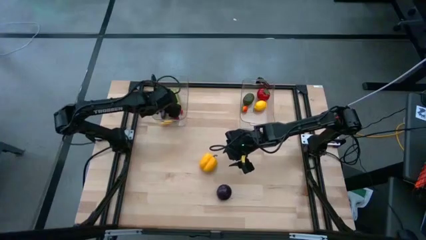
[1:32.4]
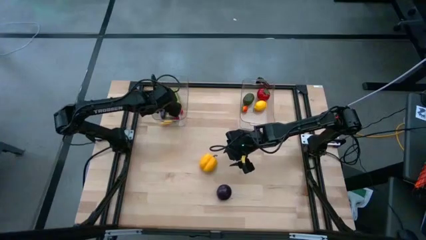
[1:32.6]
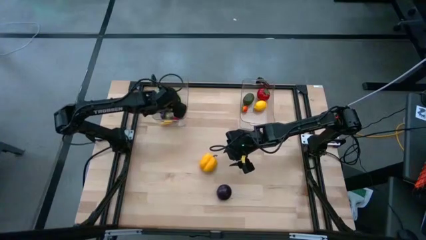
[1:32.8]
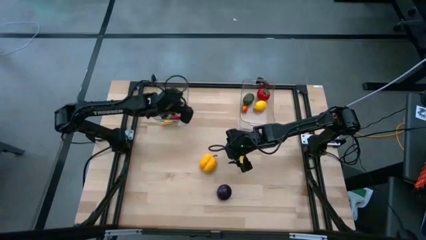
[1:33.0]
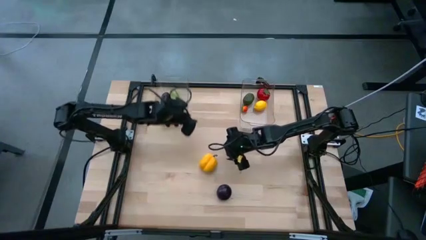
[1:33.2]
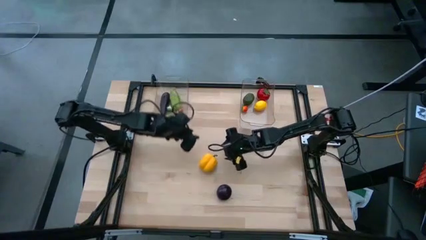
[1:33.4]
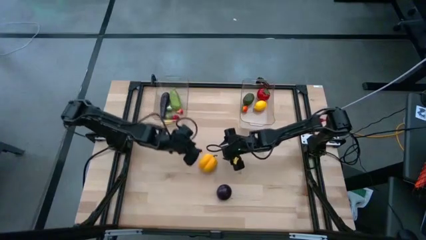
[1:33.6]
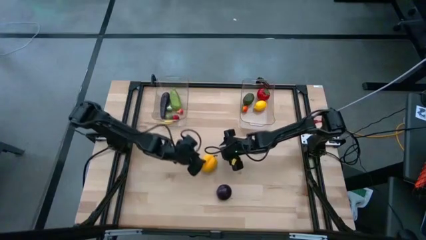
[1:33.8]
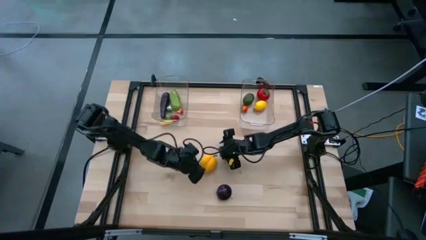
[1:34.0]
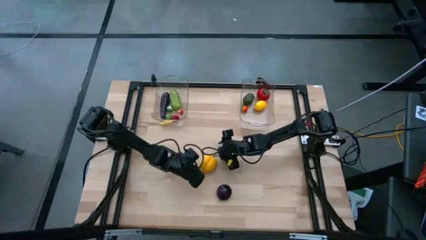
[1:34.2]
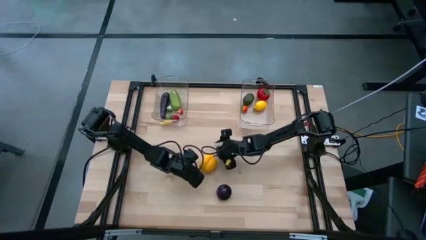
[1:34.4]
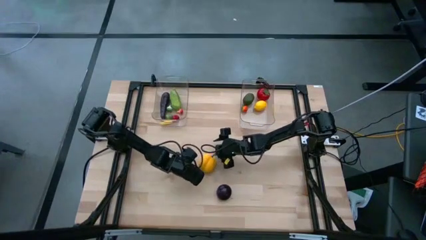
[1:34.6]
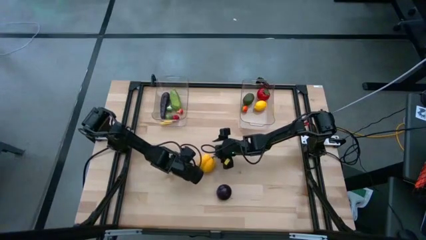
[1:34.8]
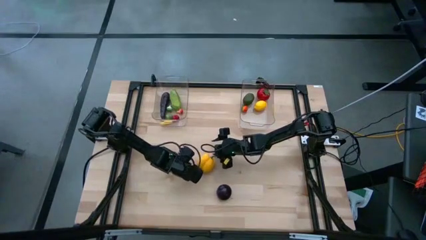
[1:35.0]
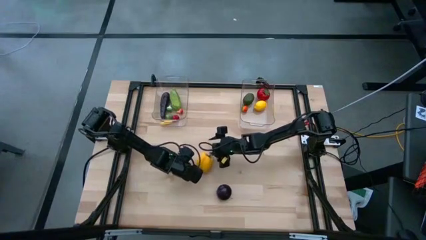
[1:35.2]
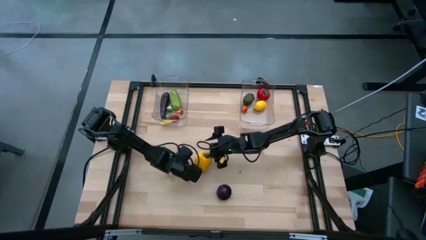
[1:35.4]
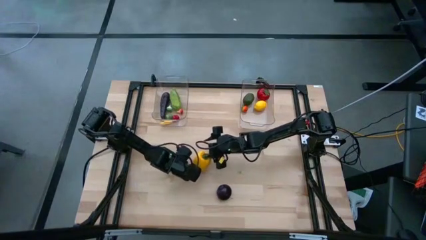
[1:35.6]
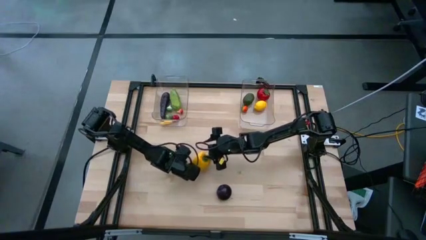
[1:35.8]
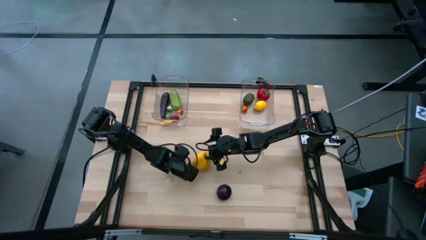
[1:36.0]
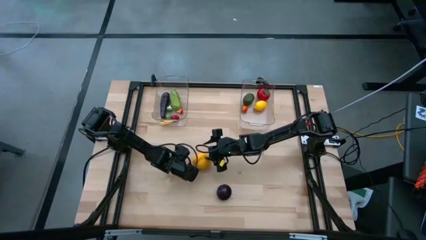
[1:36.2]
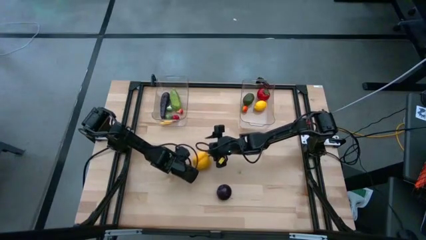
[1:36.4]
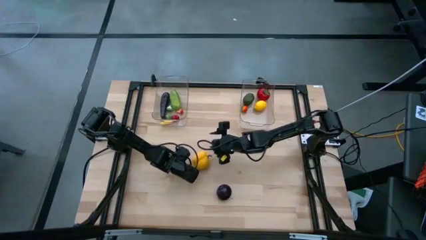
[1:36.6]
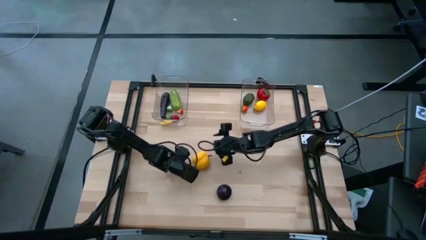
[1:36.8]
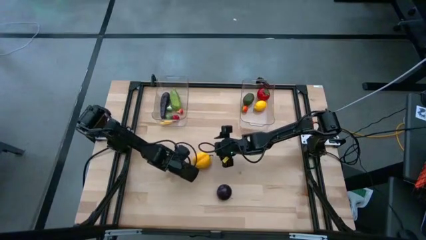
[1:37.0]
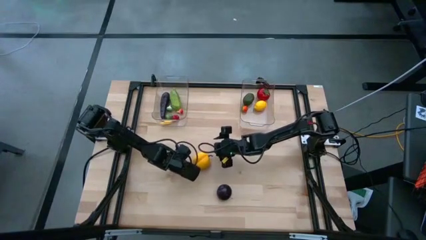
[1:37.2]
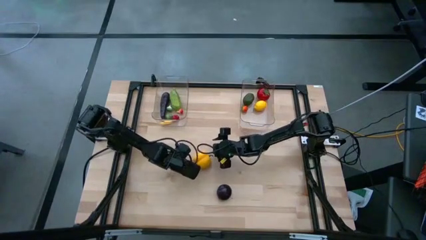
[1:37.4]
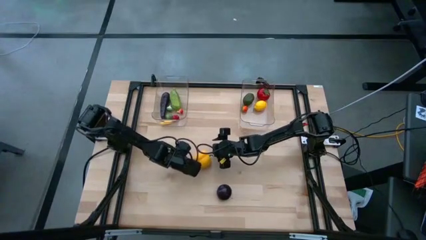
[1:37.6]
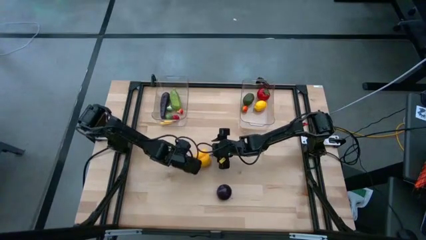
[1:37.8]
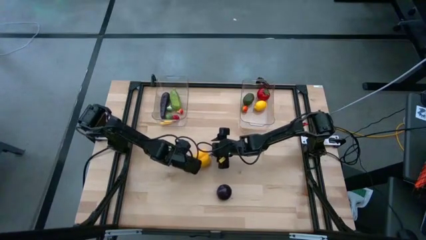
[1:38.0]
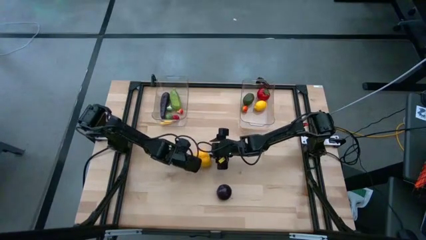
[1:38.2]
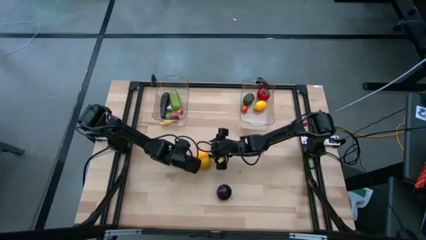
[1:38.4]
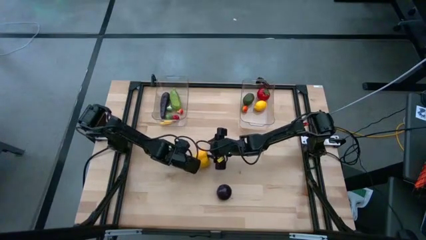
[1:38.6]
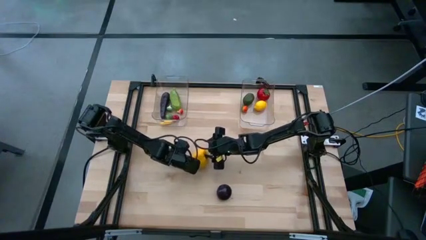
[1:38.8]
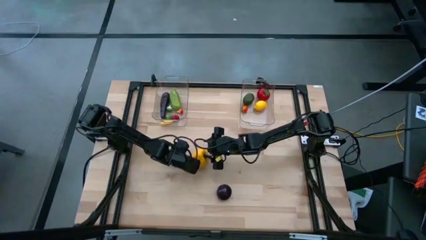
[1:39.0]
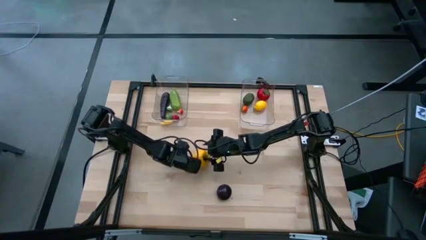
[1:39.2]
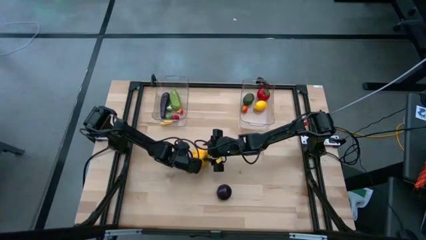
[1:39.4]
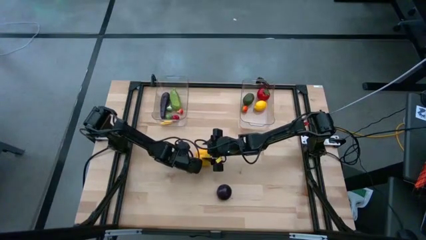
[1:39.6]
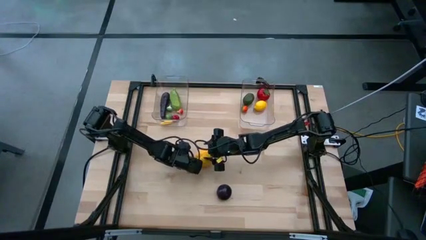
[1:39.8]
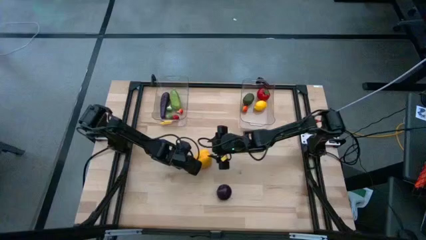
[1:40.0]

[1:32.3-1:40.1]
Task: Sort produce into baskets
Put the yellow bell pepper into the left transparent bin

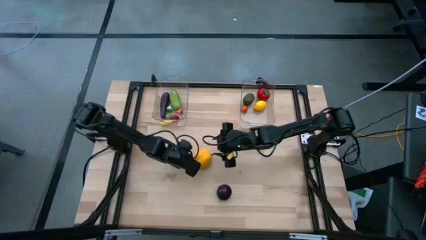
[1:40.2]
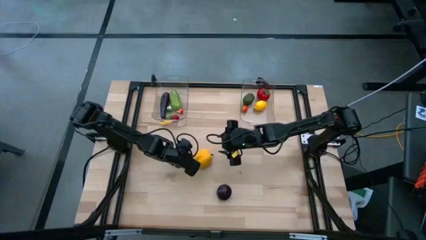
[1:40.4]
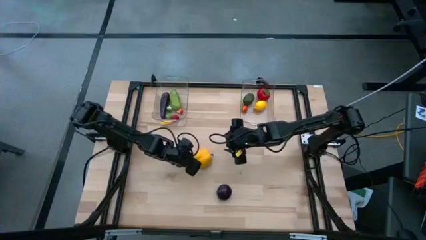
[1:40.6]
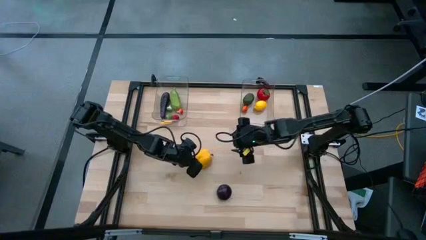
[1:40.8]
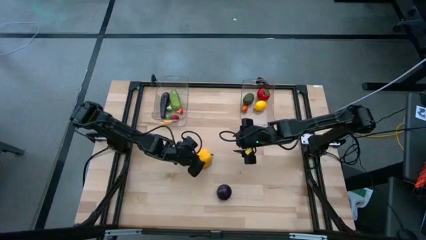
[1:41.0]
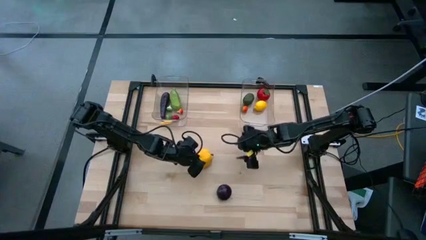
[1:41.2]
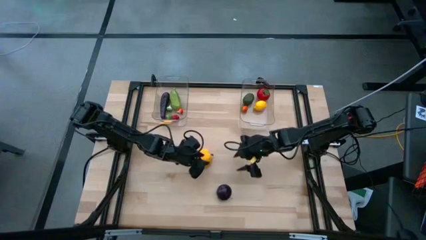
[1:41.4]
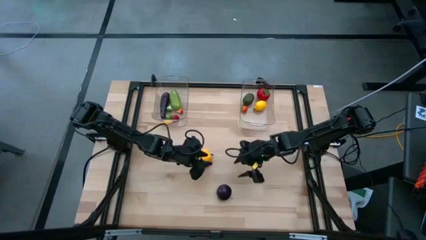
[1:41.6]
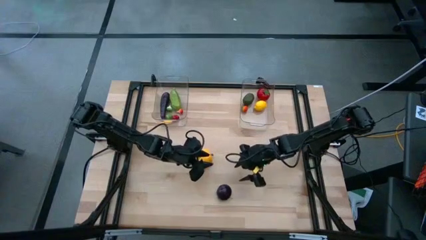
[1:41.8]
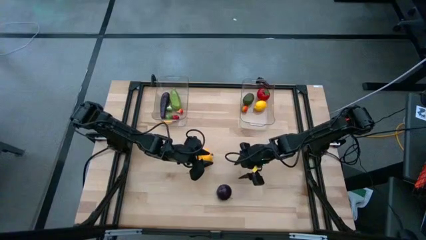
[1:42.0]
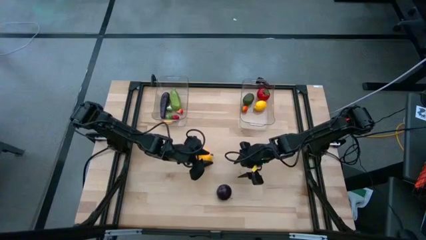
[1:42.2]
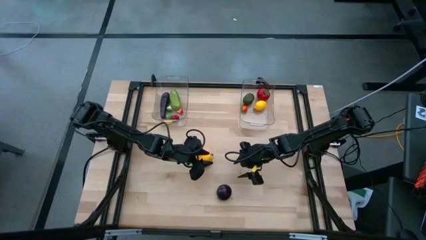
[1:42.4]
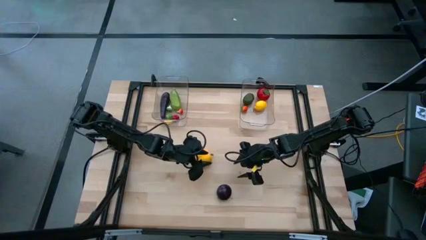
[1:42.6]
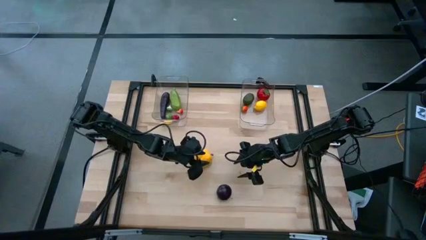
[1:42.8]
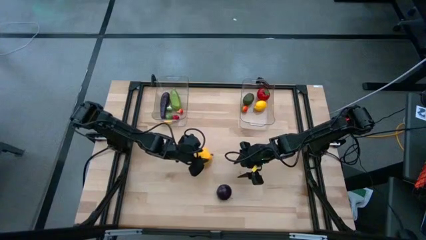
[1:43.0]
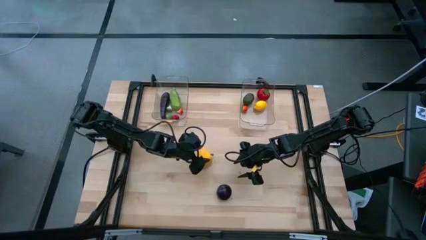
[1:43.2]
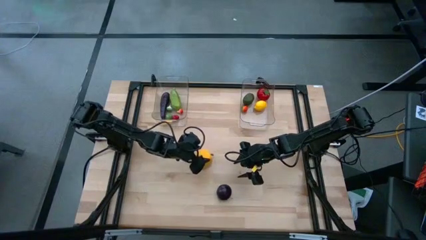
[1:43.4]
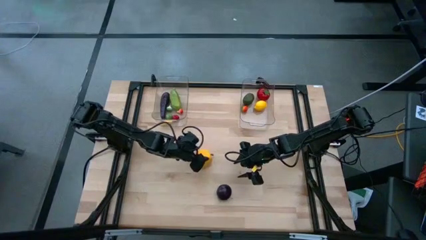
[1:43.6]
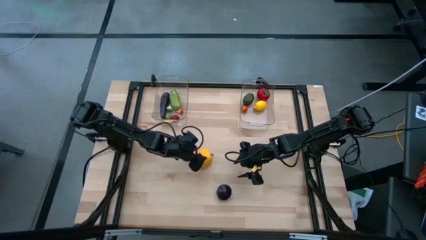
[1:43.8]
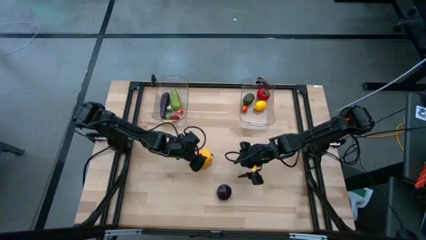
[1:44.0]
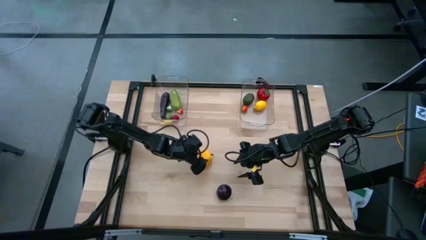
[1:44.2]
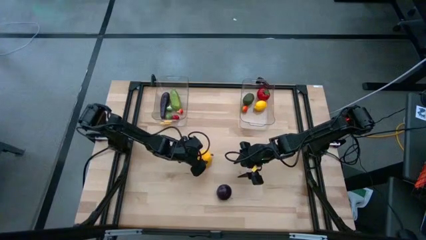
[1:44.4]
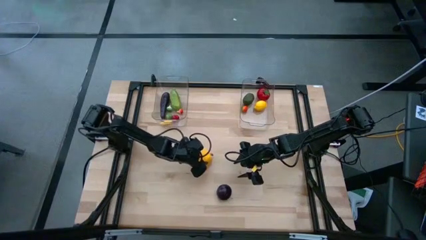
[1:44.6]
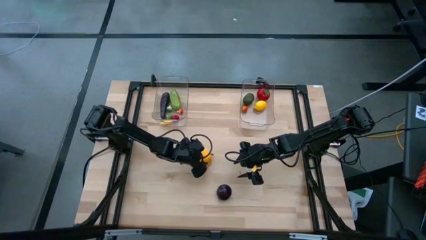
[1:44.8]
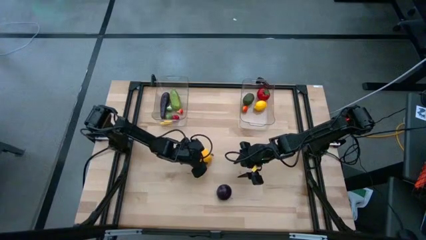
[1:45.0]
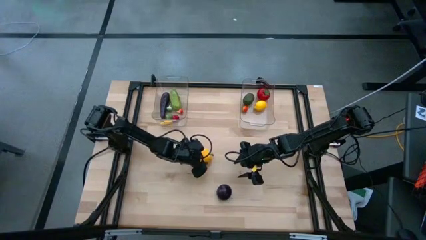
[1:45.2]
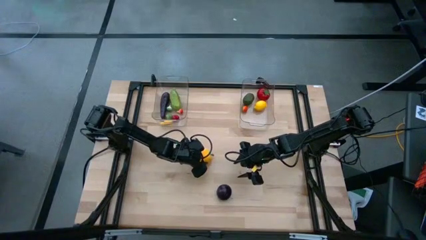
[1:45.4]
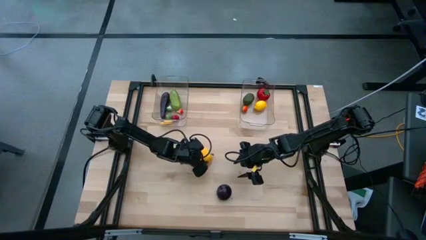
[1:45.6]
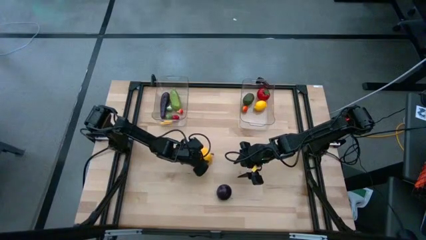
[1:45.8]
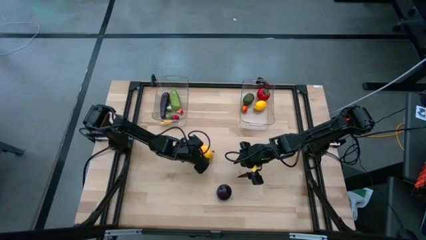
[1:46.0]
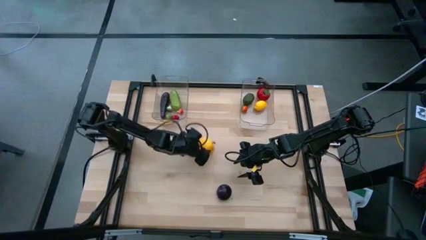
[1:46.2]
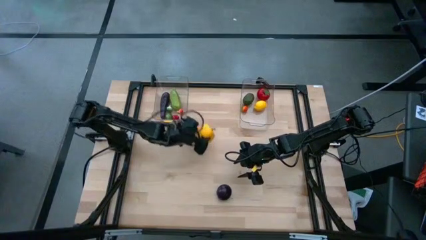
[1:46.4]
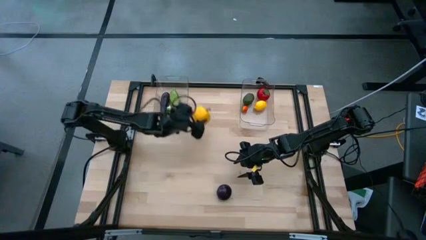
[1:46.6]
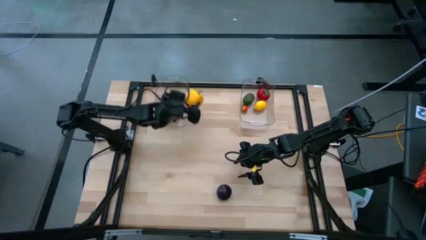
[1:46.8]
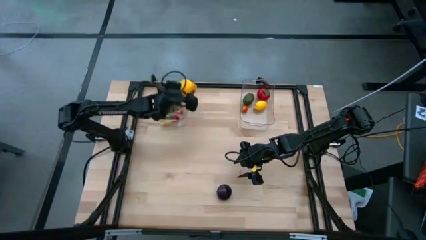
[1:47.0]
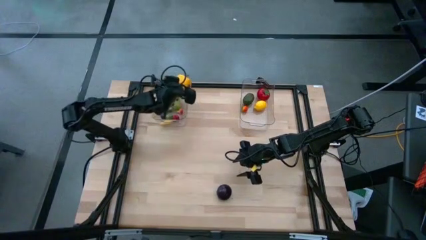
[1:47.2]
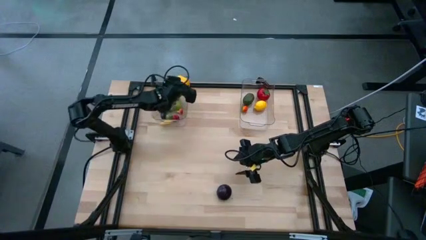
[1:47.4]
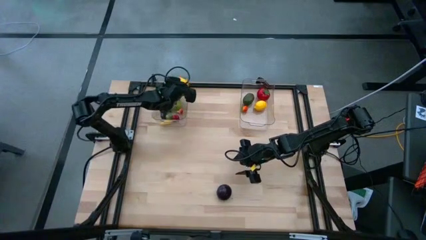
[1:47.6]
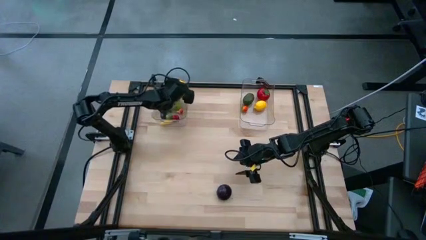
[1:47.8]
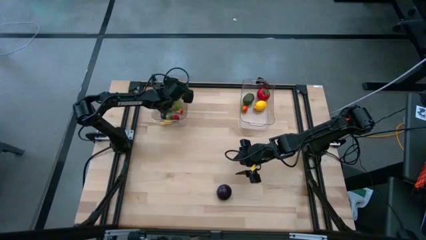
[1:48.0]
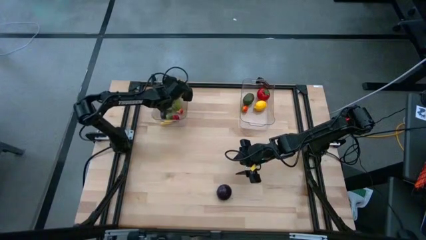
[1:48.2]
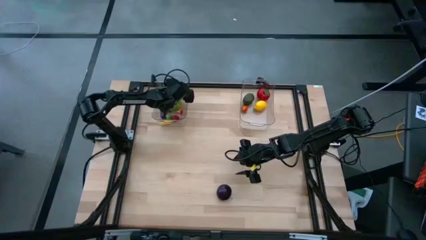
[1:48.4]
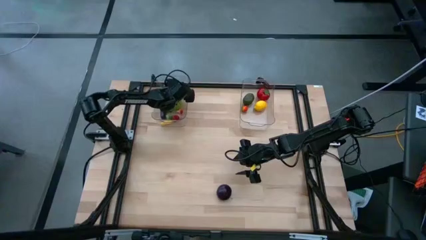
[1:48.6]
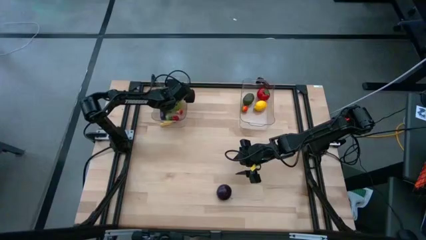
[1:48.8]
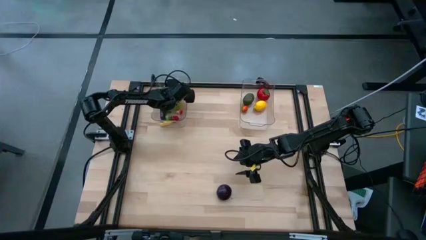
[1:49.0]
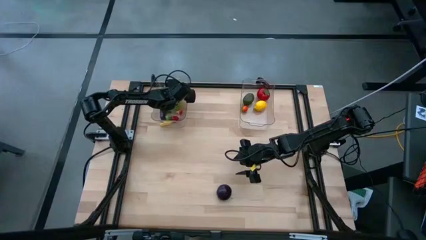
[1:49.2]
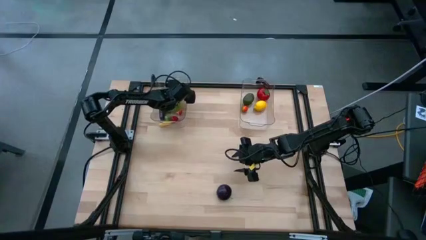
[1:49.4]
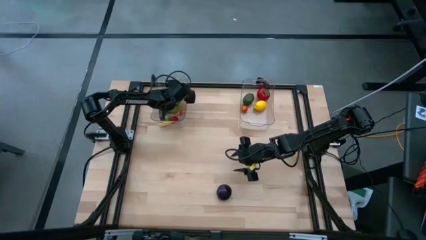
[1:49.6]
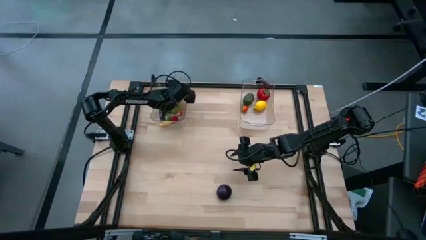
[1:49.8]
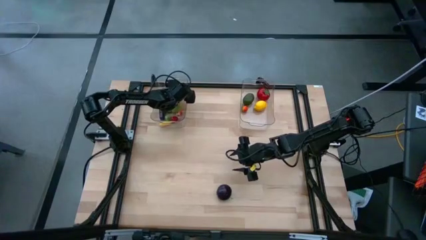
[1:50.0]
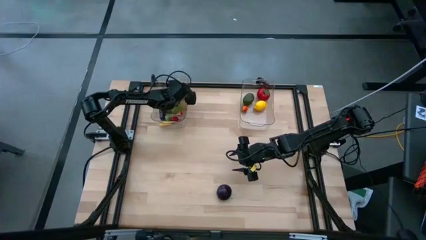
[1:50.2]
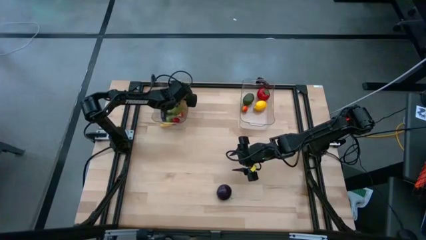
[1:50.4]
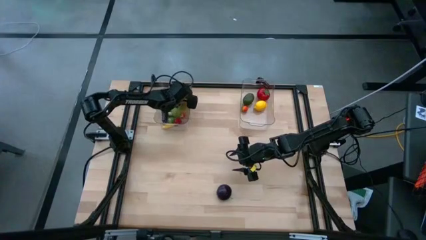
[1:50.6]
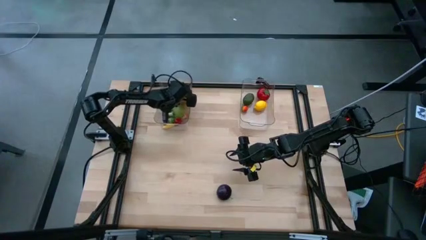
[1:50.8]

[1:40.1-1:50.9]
Put the yellow bell pepper into the left transparent bin
